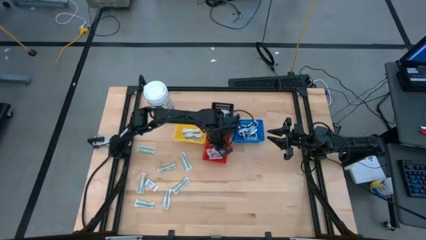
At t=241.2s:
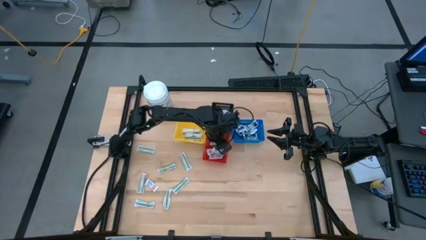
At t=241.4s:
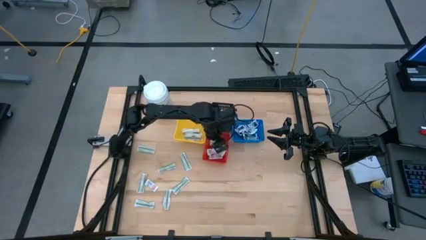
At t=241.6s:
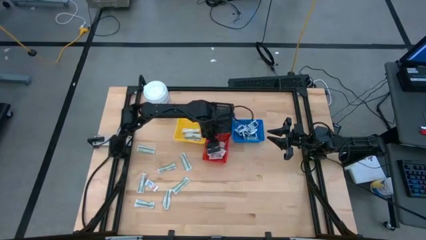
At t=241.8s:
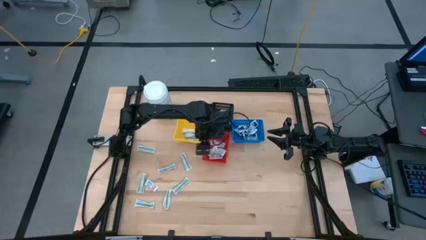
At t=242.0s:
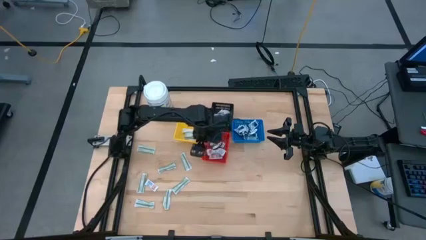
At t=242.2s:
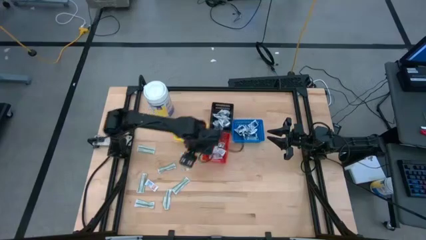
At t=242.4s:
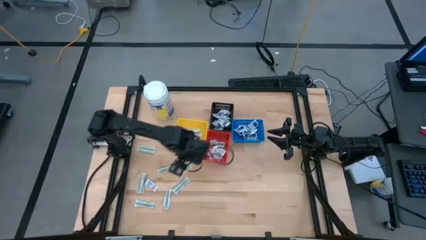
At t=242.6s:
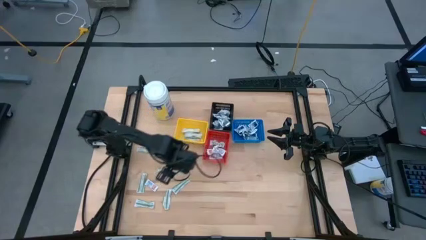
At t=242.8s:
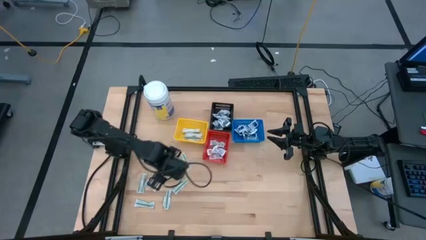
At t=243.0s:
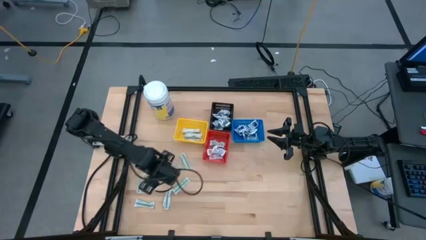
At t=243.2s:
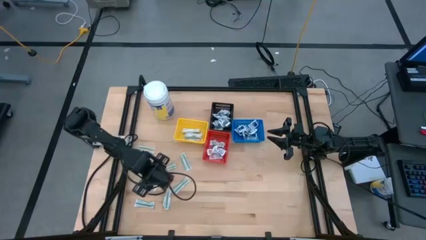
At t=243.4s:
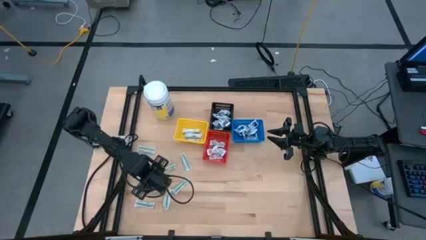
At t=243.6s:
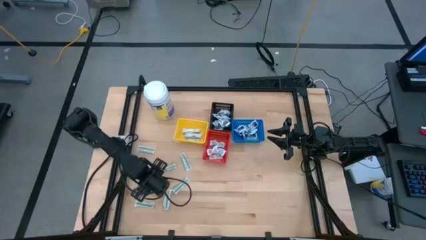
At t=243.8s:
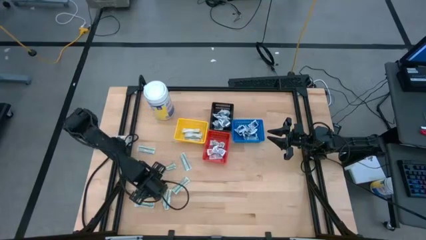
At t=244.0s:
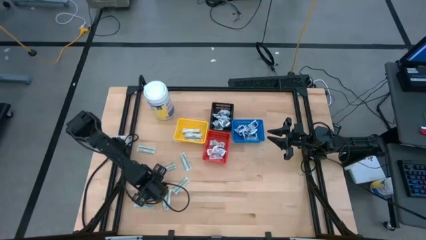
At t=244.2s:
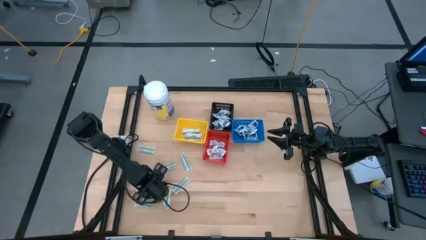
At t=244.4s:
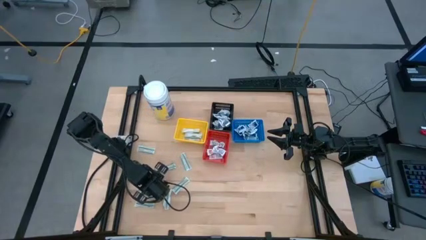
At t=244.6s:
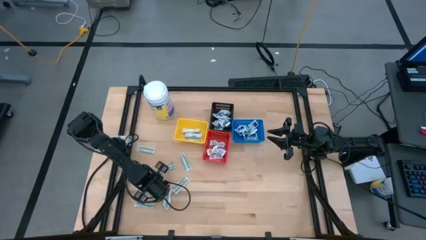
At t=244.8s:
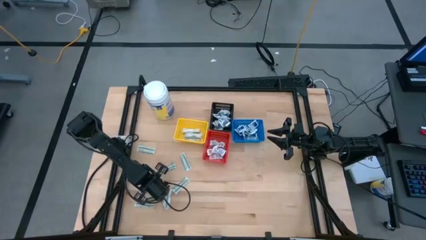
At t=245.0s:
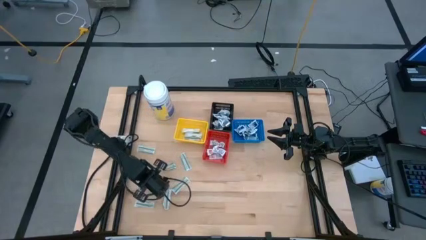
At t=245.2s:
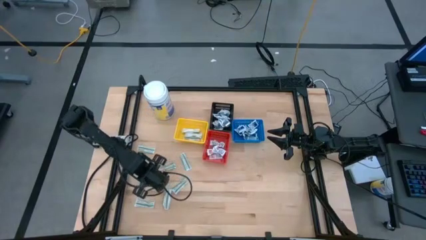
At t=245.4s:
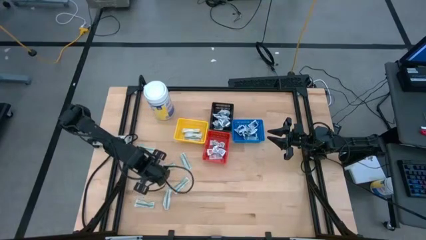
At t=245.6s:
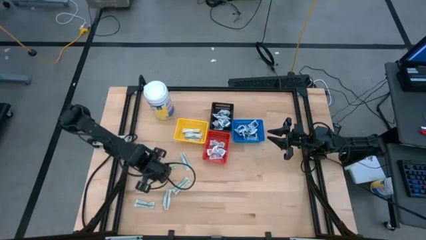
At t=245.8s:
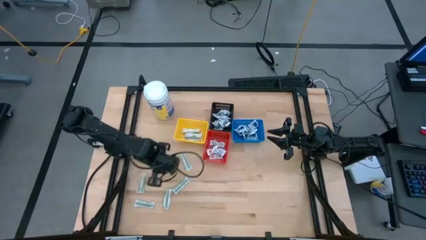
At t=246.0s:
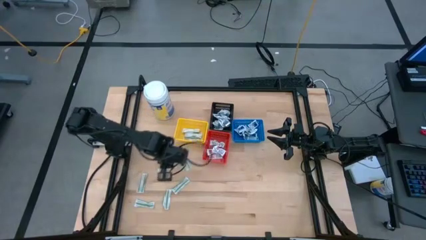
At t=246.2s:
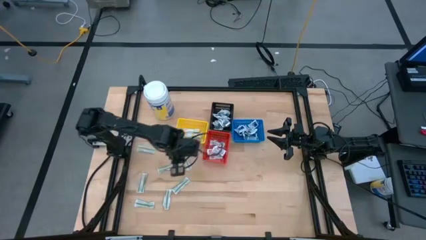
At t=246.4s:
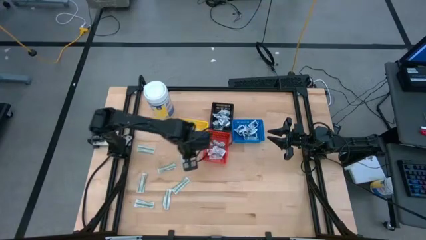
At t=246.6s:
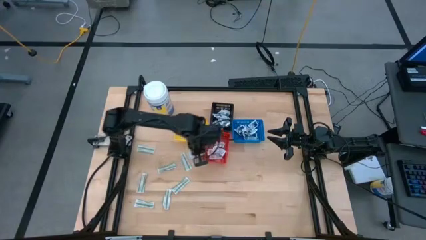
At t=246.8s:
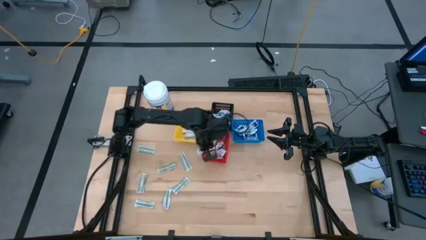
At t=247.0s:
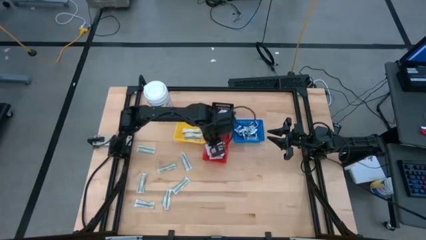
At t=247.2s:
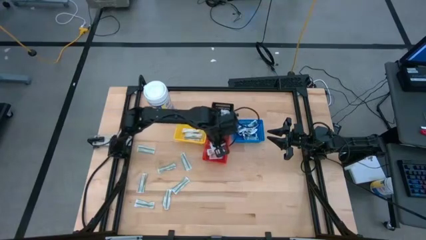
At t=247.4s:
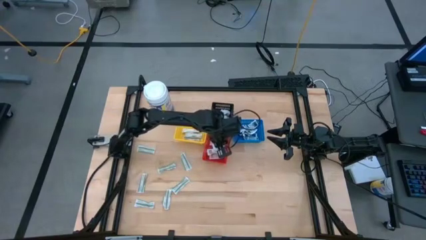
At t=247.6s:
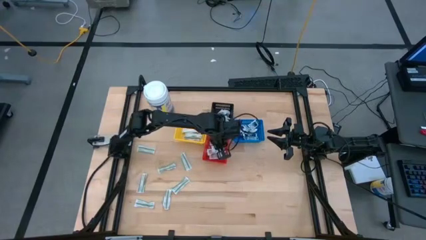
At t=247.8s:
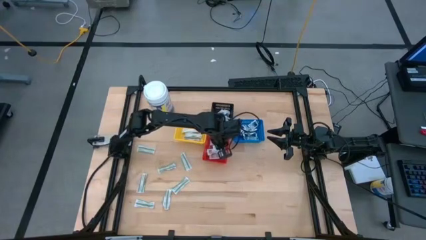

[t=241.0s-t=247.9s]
Task: Pick & Place First Aid Supplies
Put the ointment pack into the red bin

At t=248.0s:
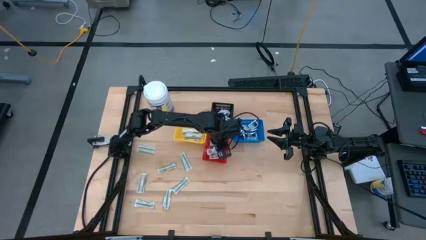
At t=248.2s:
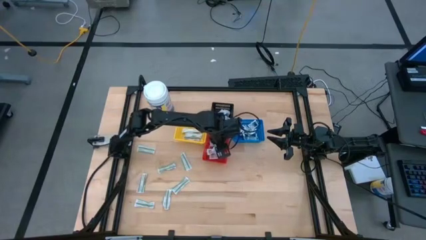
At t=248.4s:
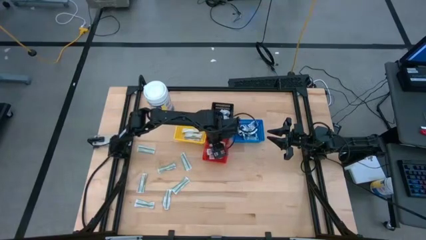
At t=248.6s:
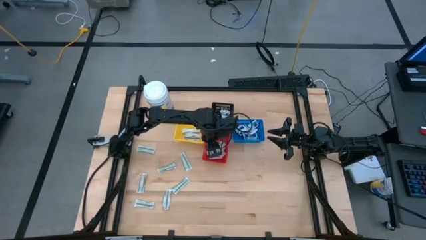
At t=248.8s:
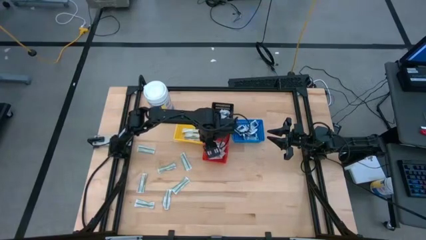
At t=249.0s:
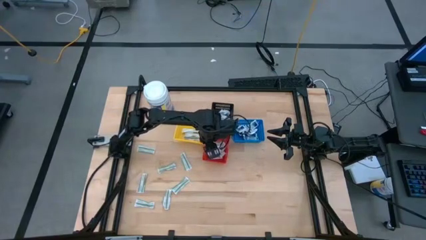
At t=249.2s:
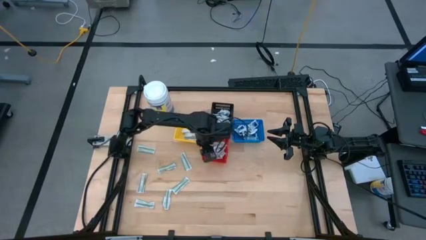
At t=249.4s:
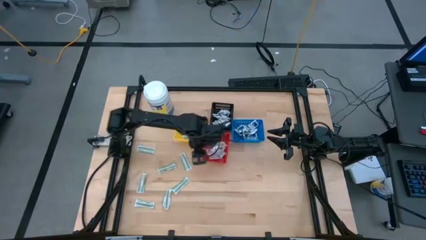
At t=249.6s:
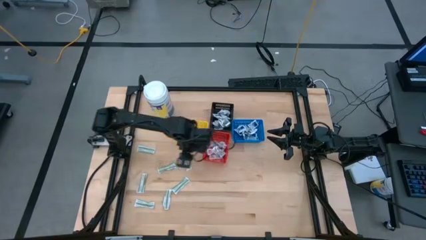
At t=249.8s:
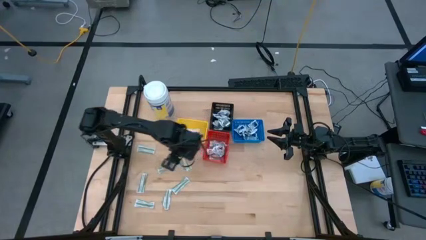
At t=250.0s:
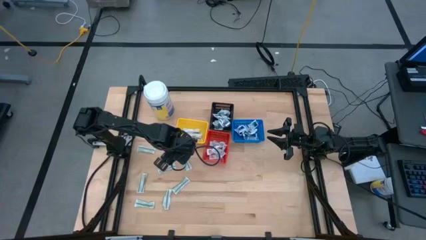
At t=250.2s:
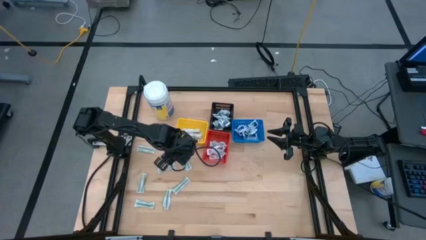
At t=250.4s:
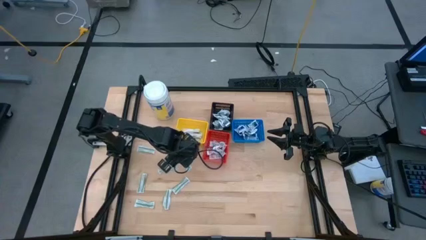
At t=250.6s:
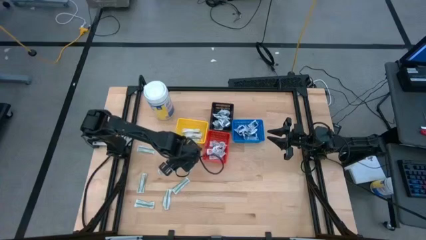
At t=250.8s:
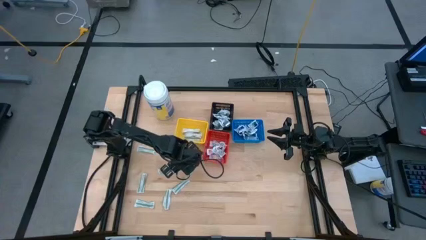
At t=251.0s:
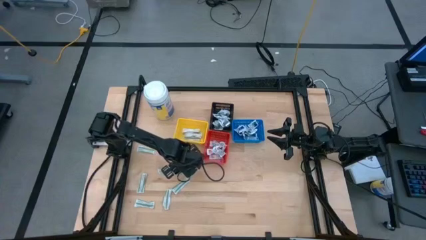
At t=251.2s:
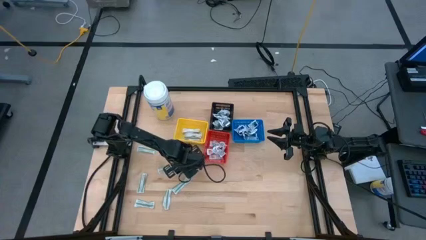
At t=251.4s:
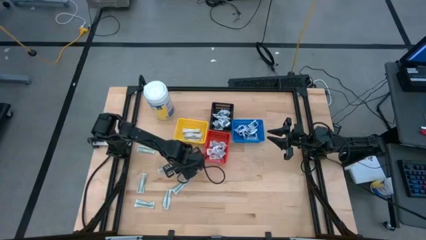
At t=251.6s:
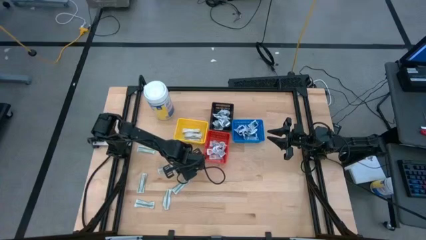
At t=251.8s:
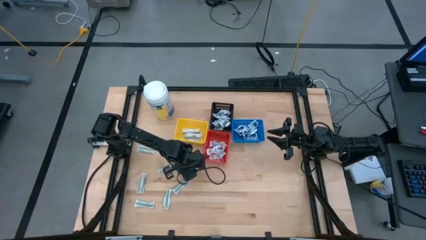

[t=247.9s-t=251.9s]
Put the bandage pack into the yellow bin

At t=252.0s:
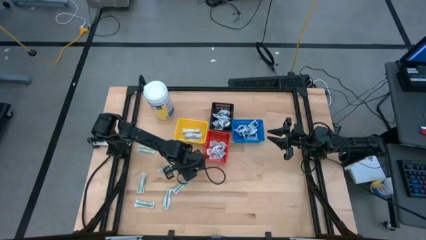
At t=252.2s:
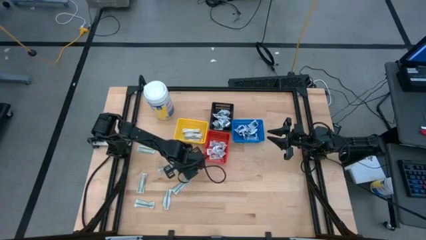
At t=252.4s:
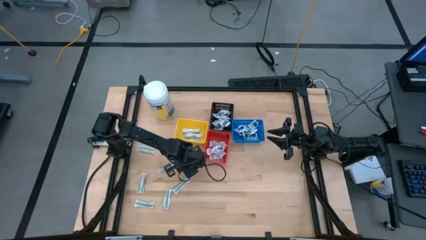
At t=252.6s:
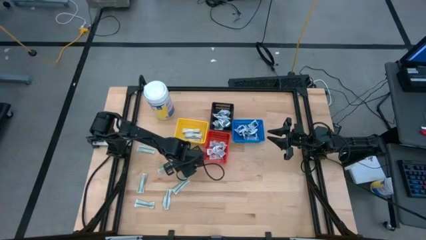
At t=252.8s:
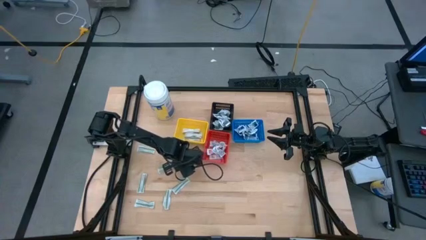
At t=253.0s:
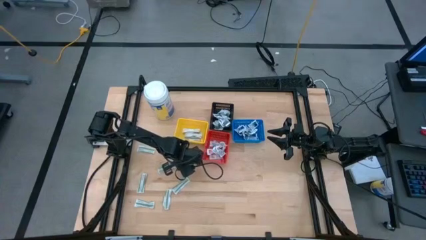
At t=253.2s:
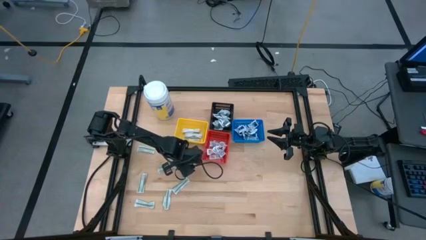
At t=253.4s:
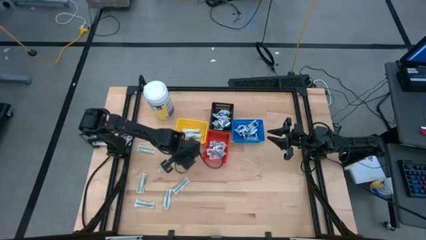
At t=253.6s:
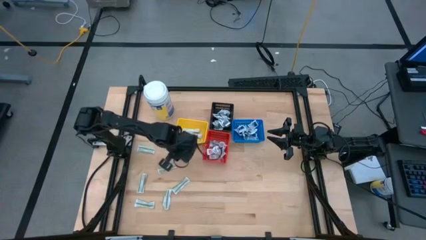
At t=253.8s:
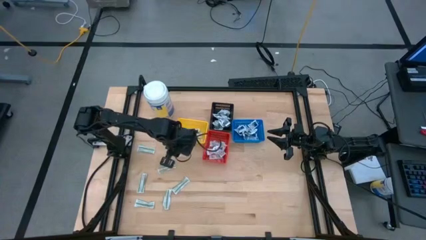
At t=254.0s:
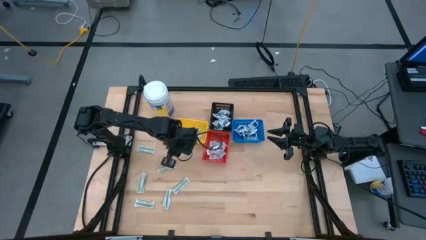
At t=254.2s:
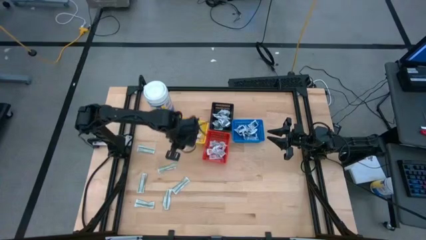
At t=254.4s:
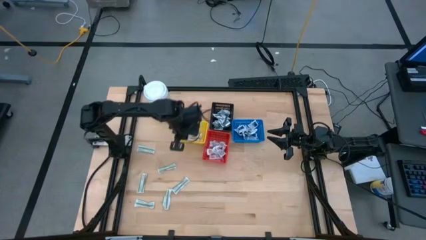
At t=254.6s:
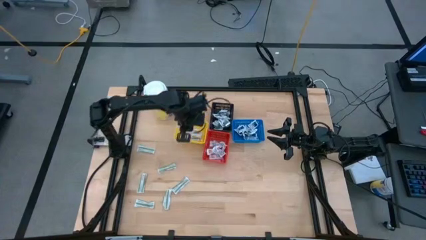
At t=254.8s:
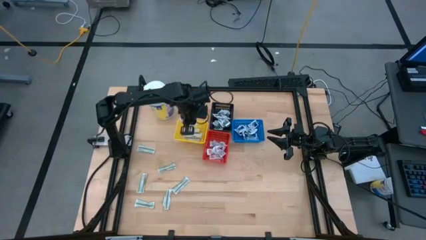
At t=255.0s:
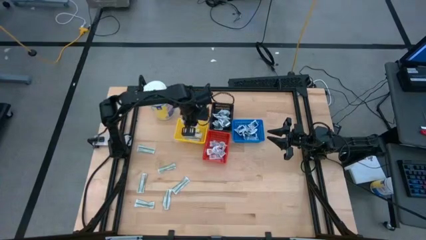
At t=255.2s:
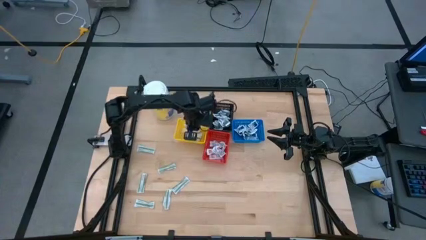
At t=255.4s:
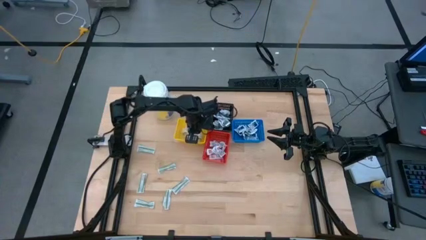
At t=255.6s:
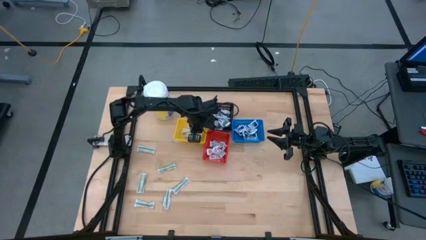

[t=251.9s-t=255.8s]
Put the bandage pack into the yellow bin
